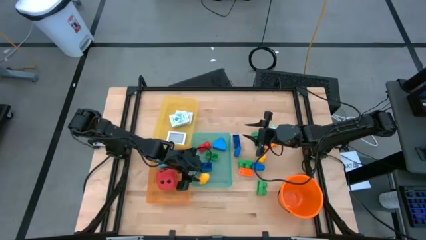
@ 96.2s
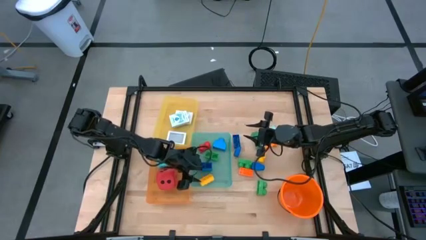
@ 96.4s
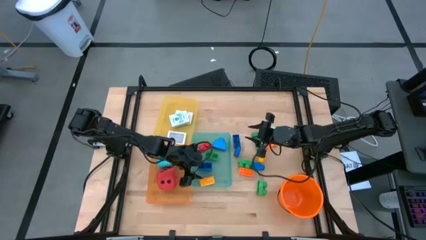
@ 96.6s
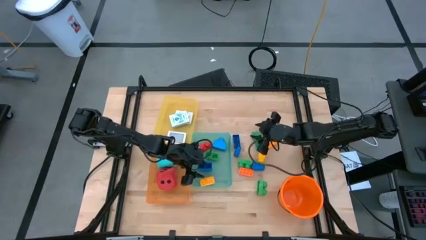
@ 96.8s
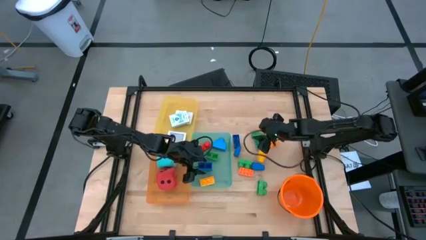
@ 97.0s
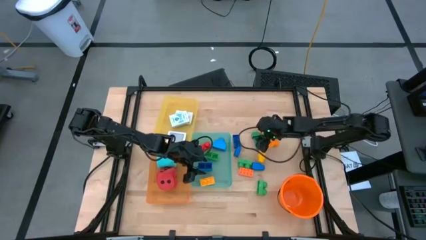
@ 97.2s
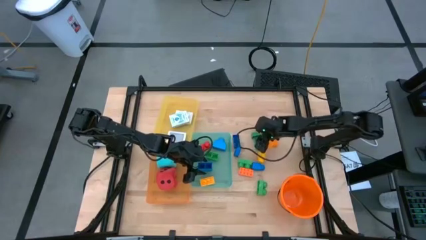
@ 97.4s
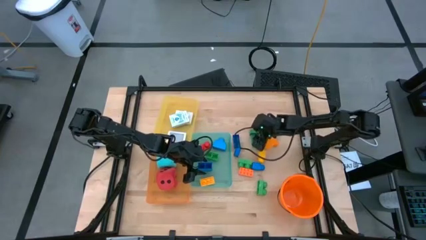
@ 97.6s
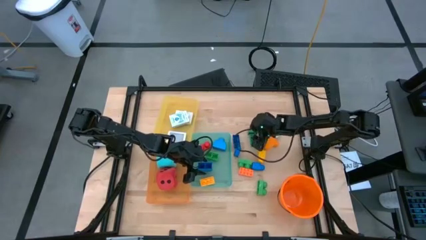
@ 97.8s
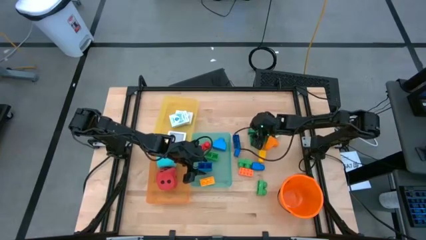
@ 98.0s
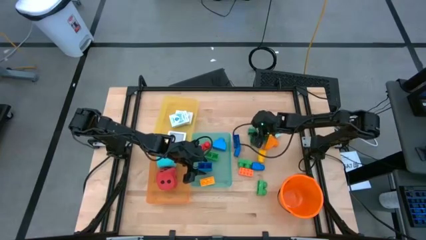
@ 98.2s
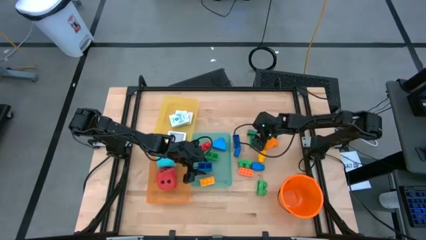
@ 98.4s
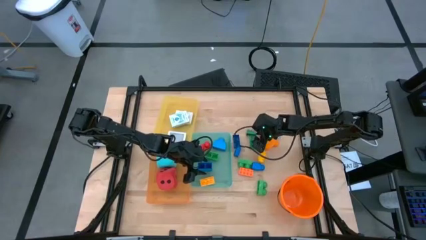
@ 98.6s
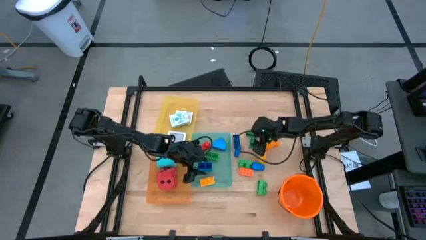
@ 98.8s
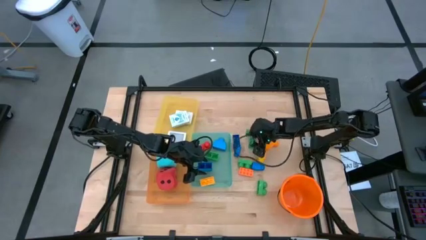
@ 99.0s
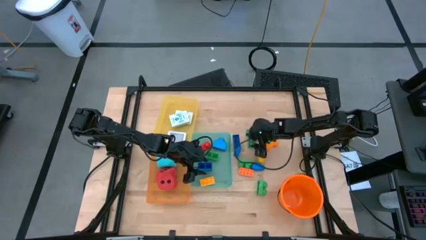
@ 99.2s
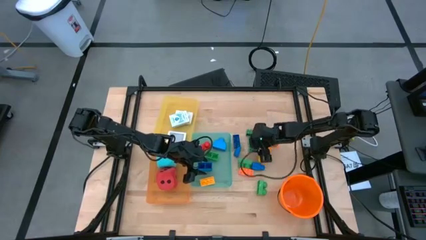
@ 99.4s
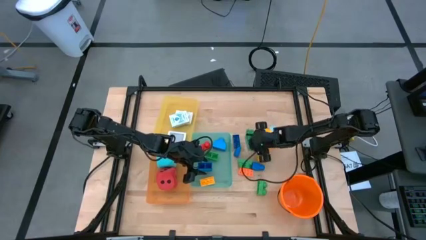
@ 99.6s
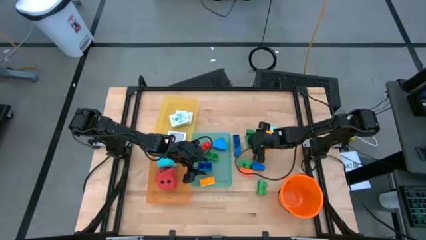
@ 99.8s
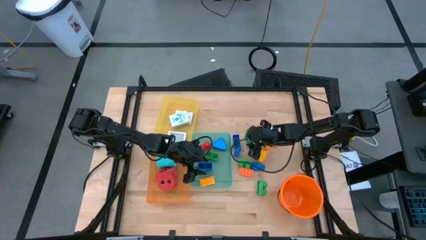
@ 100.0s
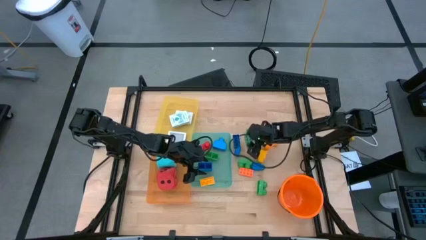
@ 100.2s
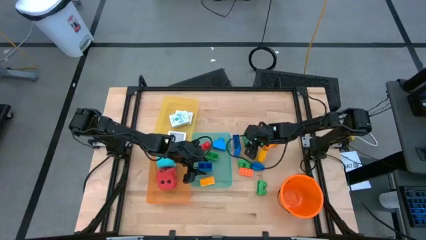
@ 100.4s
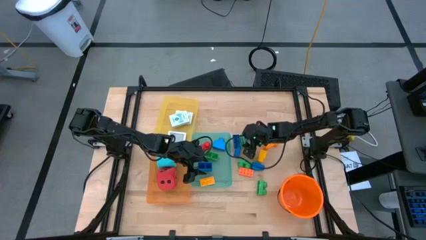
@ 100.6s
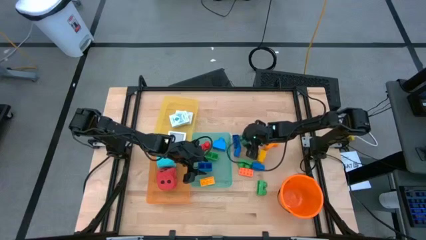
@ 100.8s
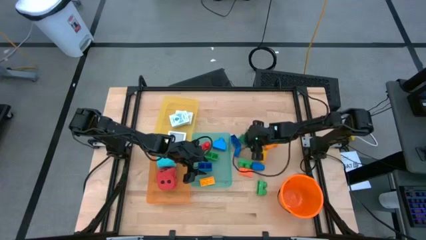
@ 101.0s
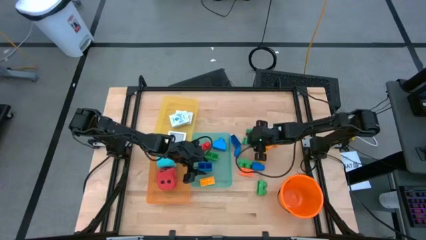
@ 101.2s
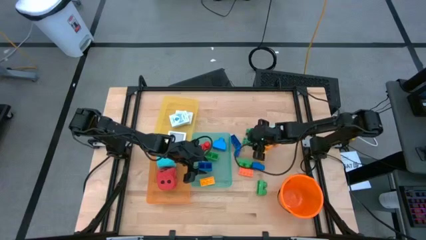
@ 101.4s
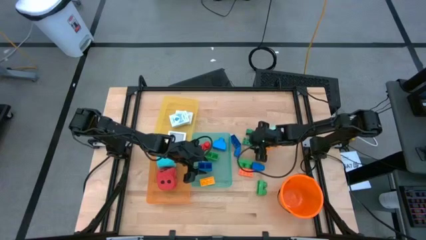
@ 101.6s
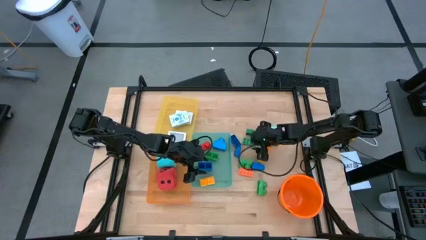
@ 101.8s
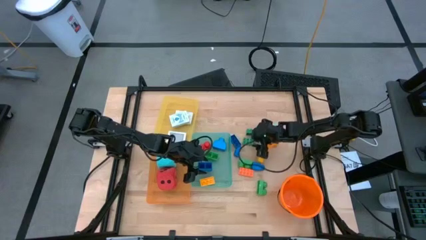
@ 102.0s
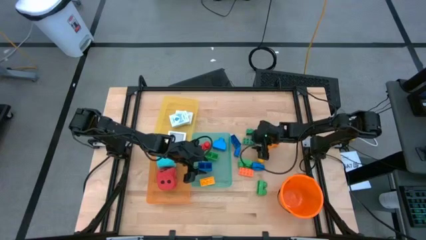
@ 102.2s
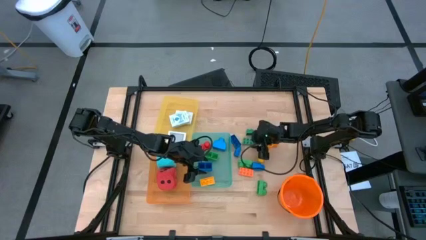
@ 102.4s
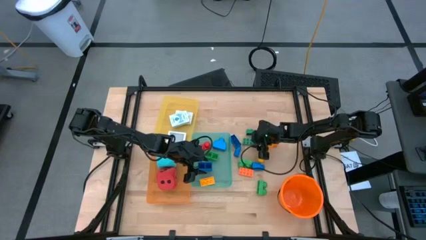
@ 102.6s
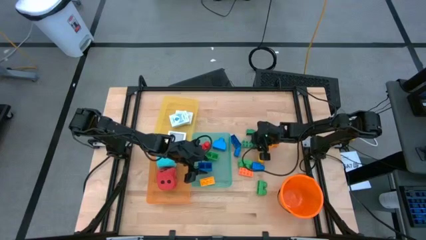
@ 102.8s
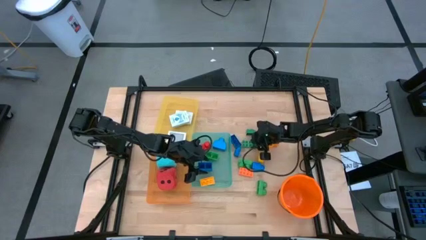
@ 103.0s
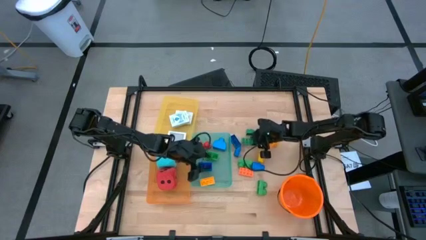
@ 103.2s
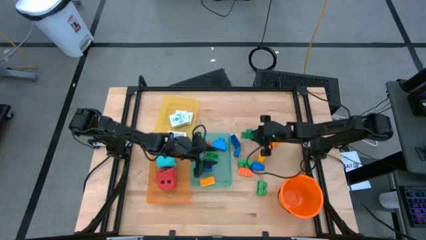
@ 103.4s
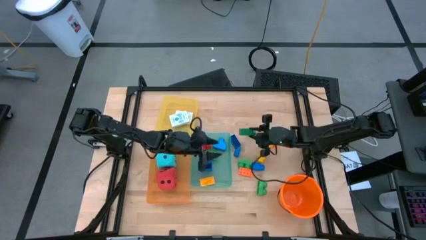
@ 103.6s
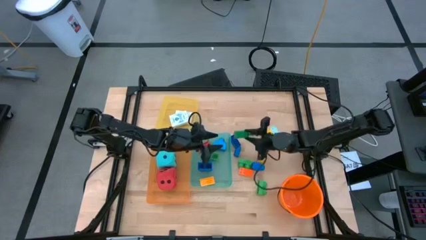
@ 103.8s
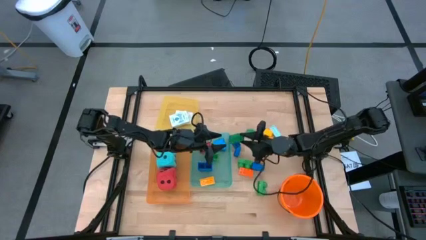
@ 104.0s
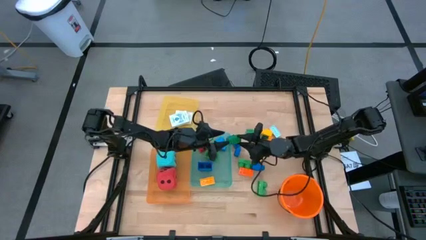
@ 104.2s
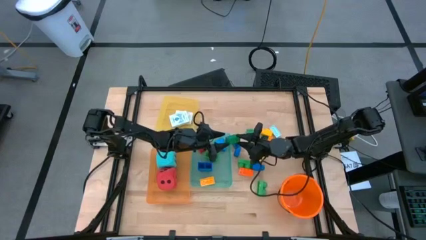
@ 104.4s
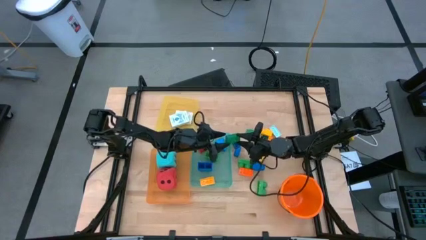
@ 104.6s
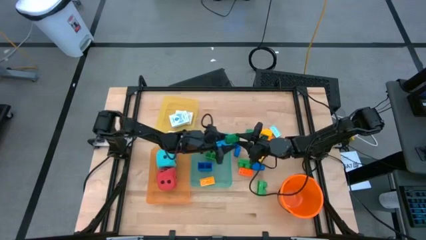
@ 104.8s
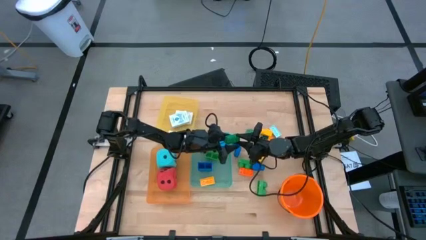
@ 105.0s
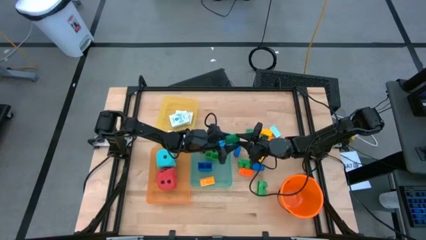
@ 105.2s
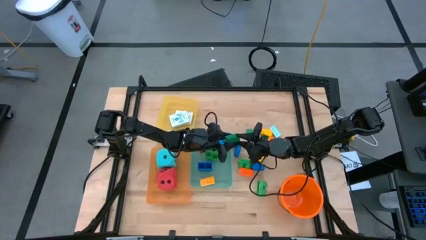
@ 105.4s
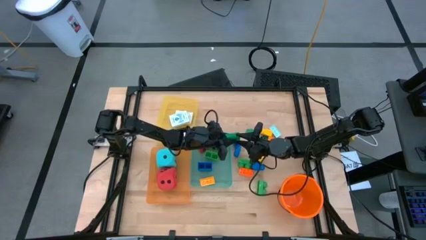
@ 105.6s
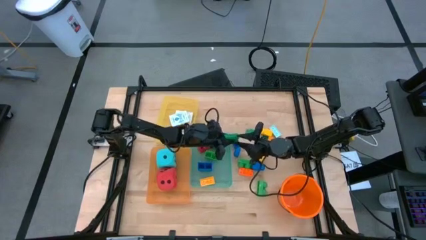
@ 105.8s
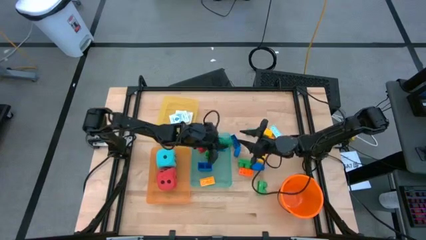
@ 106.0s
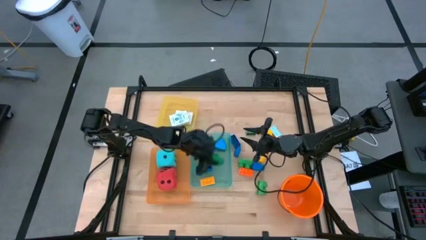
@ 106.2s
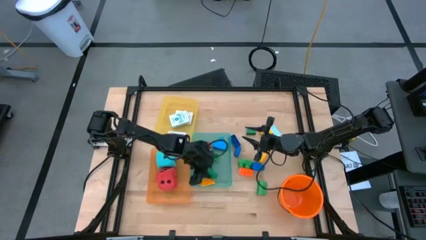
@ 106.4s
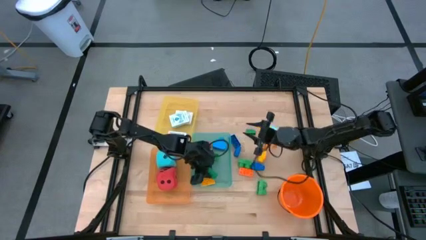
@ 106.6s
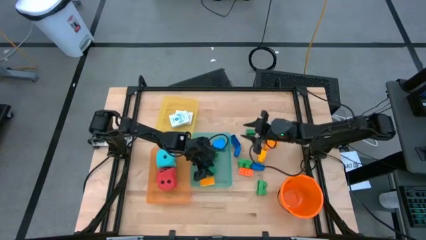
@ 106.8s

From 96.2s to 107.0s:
Task: Pick & Place Toys
Put the green game piece into the green bin

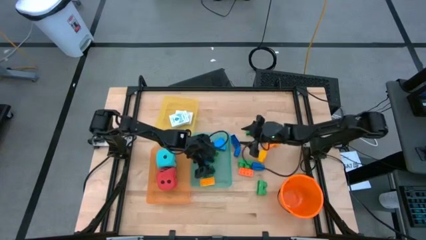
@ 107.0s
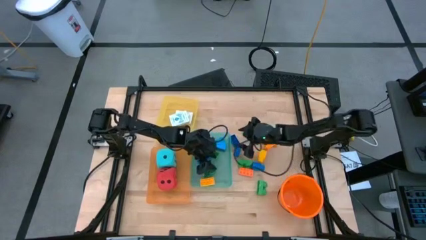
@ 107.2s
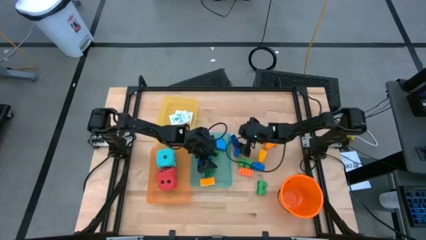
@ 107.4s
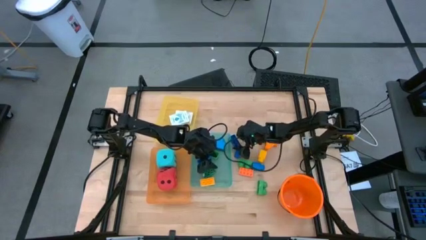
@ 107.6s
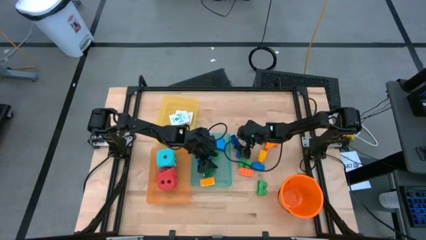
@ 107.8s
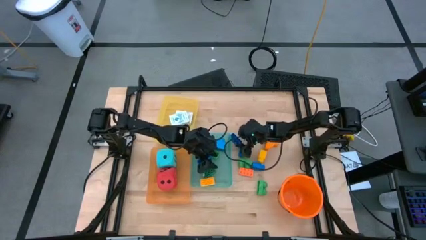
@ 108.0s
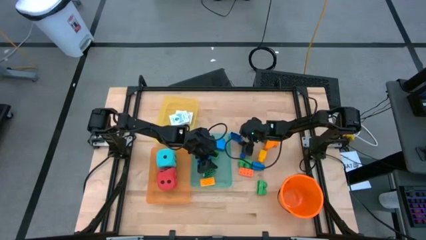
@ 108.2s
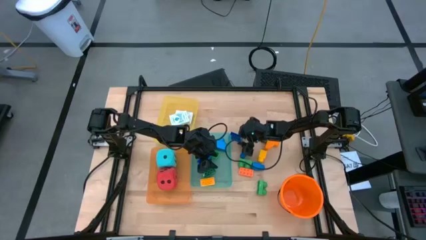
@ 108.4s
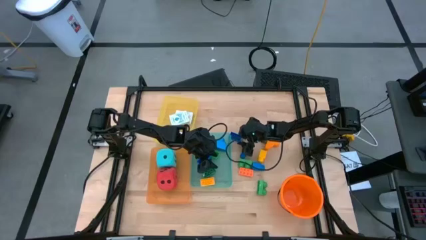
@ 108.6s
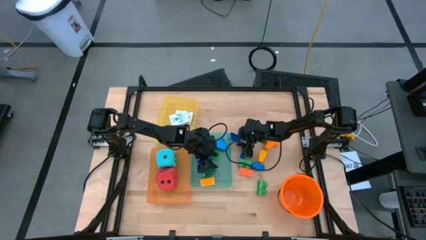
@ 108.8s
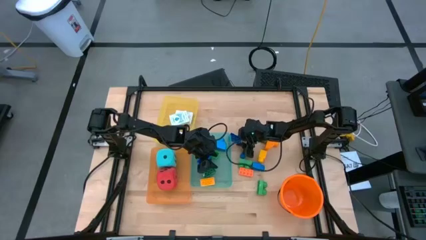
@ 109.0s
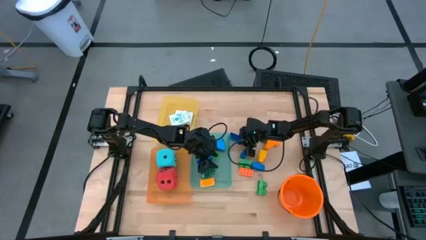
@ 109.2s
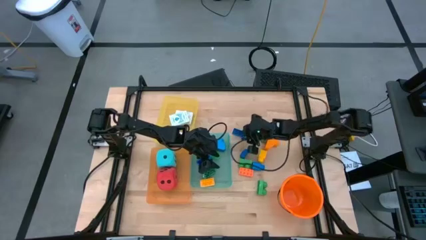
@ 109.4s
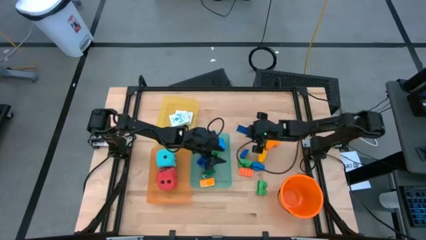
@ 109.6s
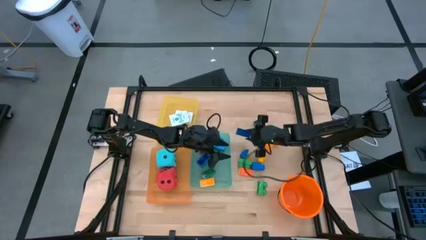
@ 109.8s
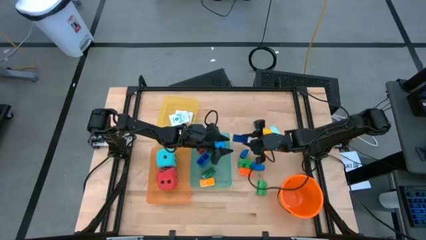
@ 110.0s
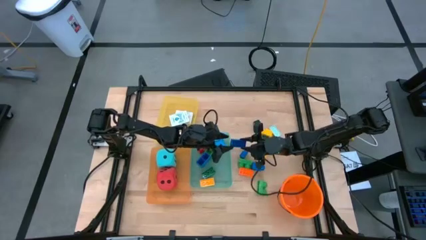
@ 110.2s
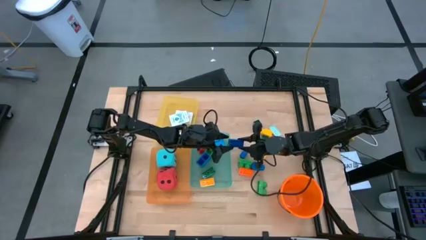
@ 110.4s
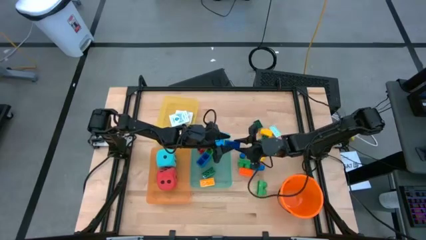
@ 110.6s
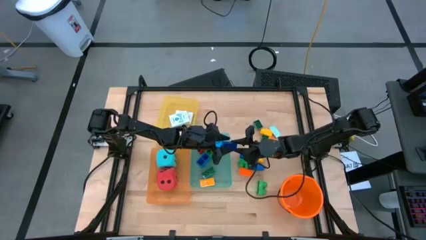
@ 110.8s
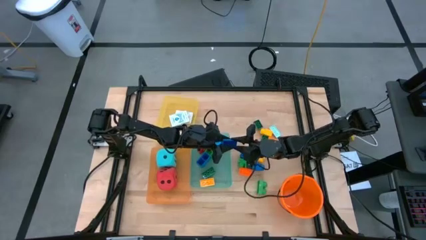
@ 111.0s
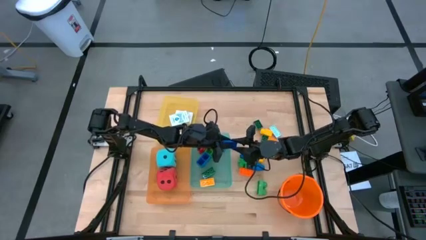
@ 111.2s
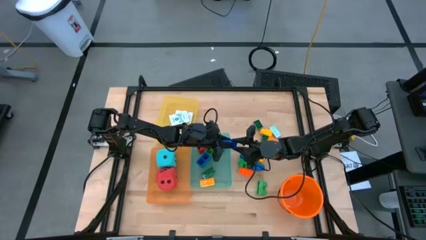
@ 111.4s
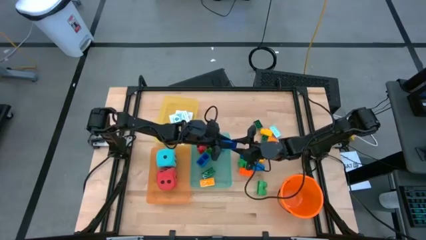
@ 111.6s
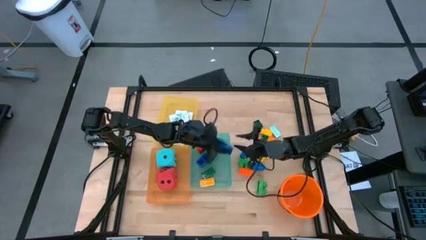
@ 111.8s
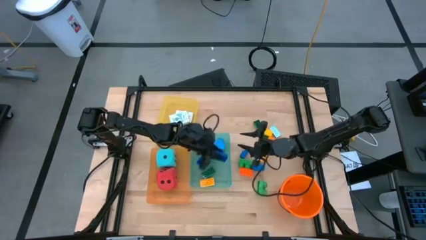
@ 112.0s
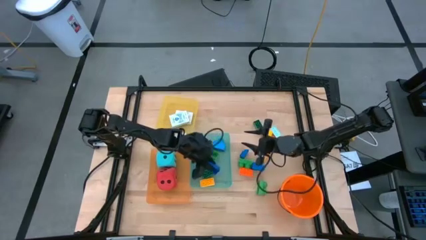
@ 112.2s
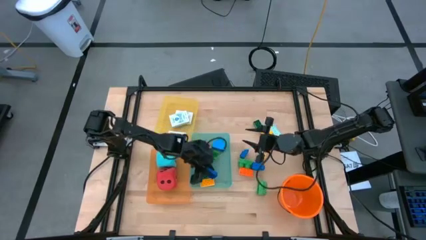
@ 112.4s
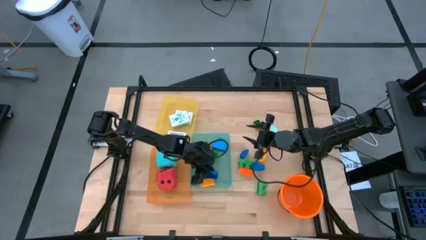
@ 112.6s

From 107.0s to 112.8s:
Put the blue game piece into the green bin
